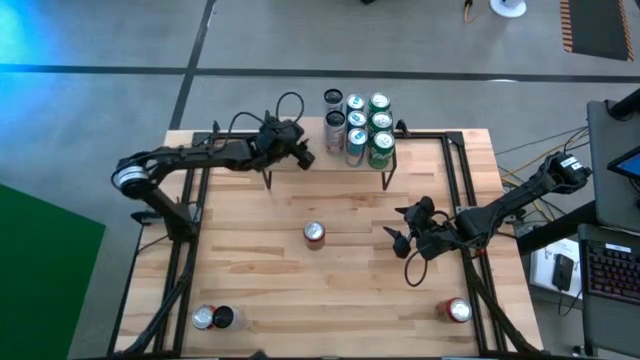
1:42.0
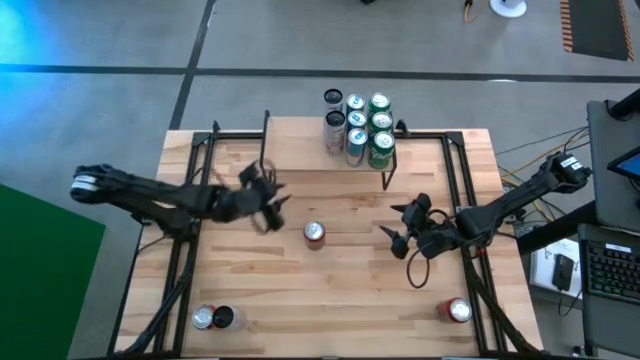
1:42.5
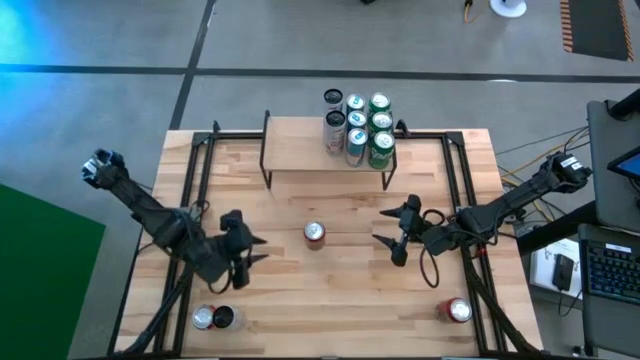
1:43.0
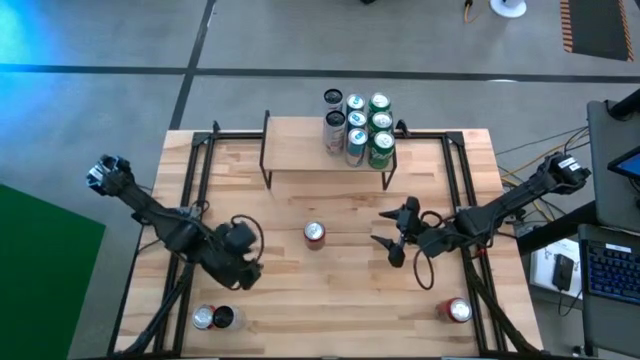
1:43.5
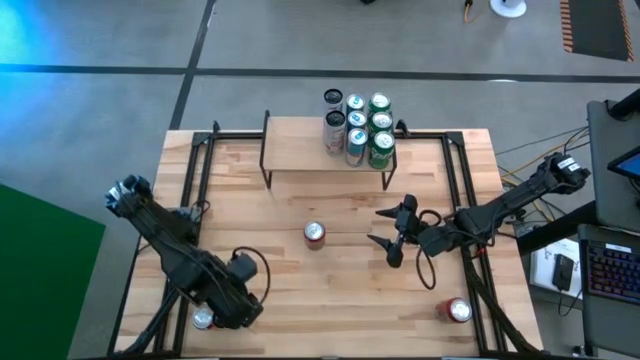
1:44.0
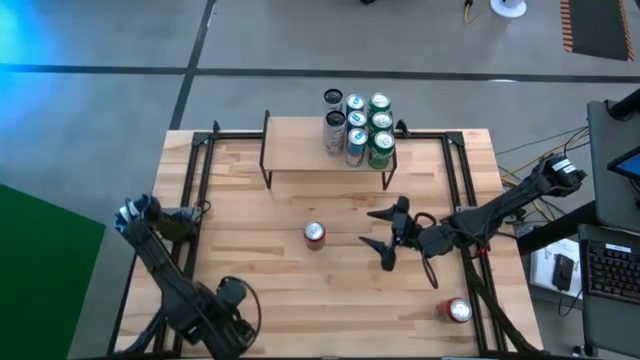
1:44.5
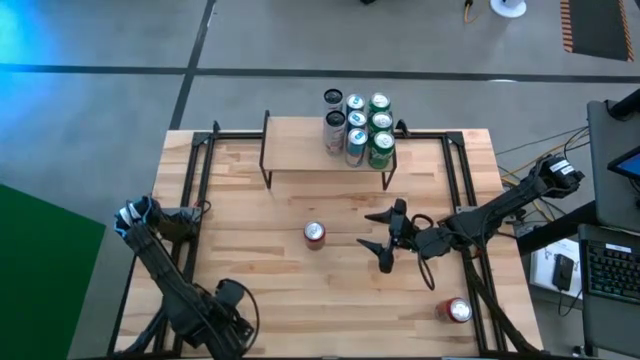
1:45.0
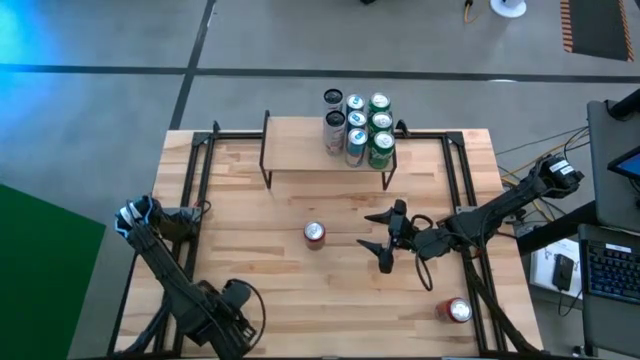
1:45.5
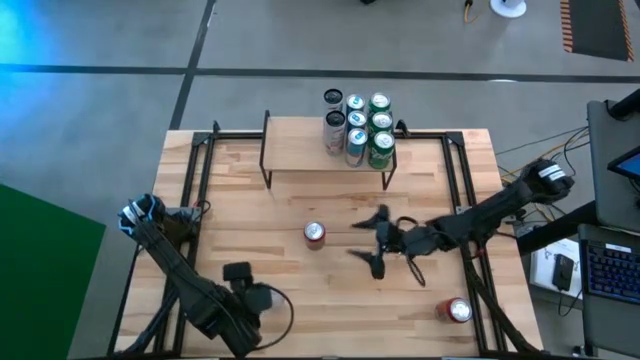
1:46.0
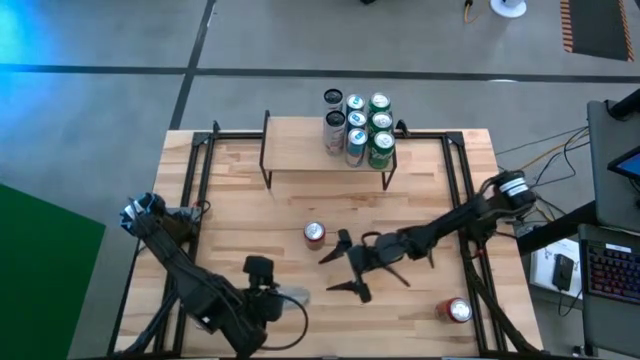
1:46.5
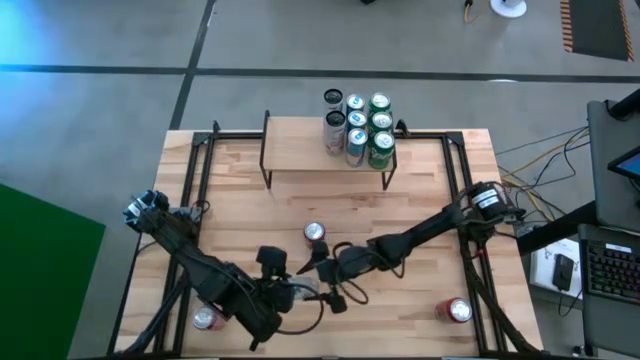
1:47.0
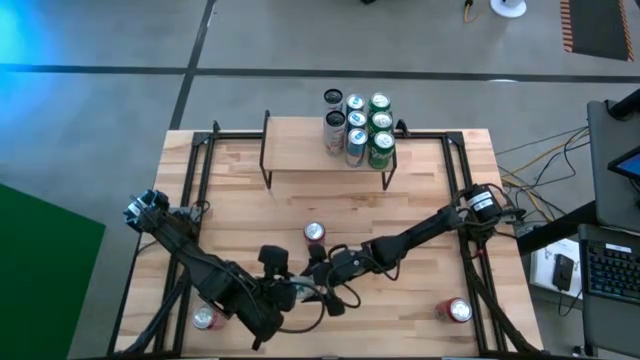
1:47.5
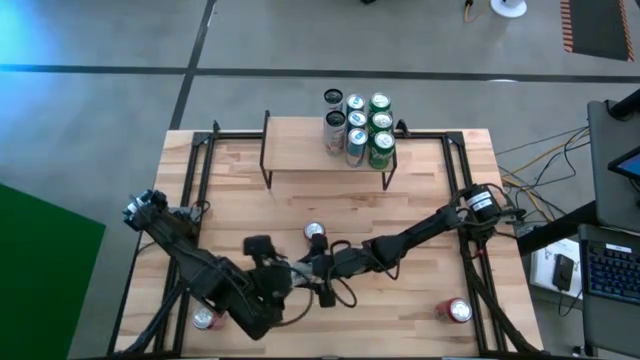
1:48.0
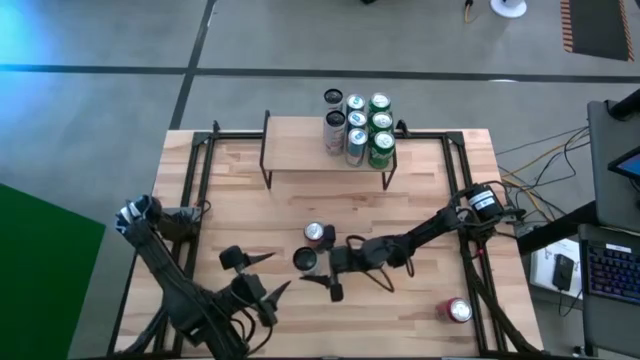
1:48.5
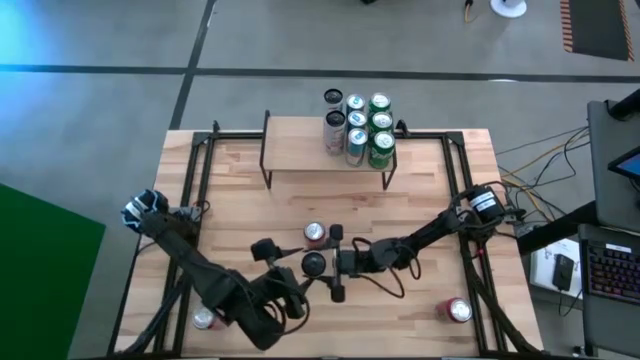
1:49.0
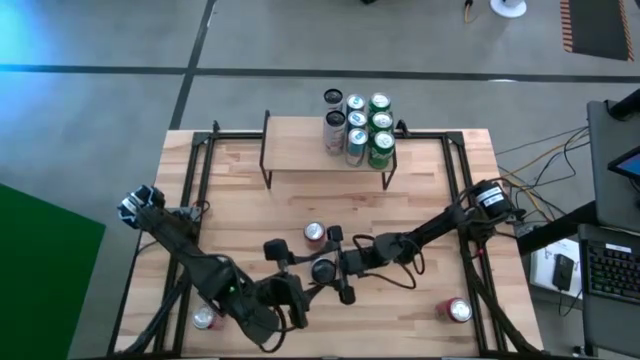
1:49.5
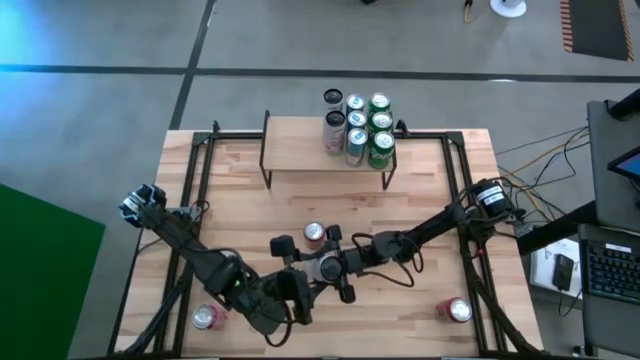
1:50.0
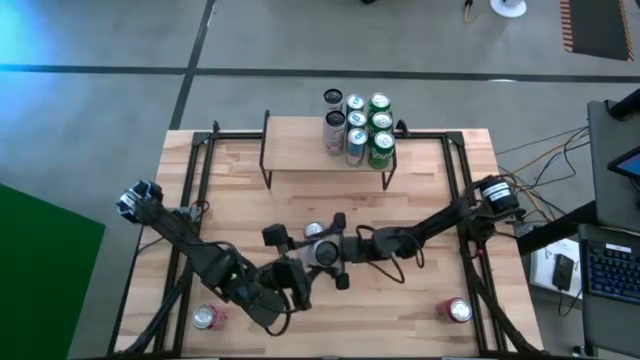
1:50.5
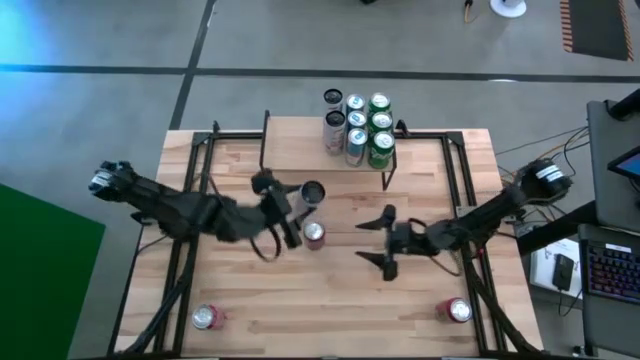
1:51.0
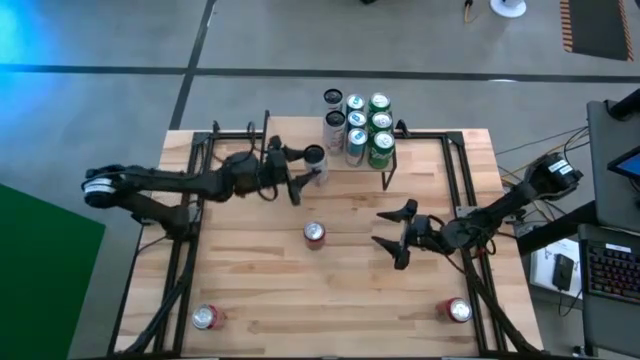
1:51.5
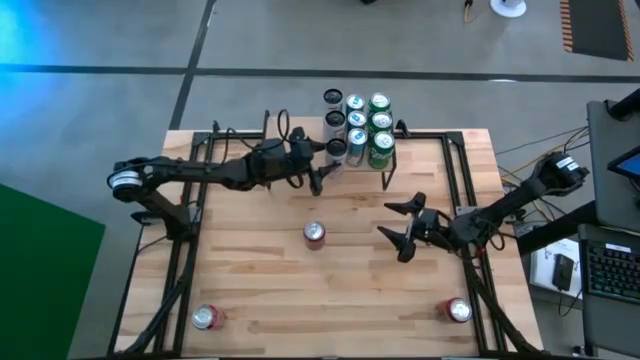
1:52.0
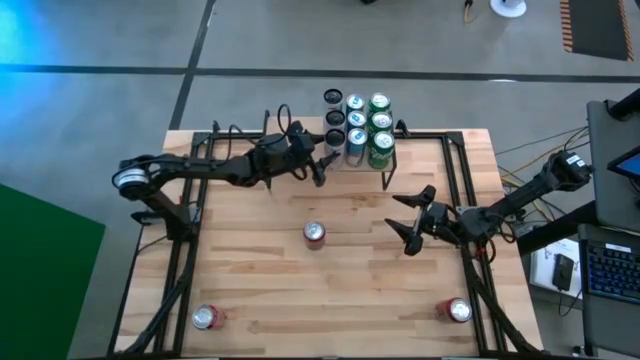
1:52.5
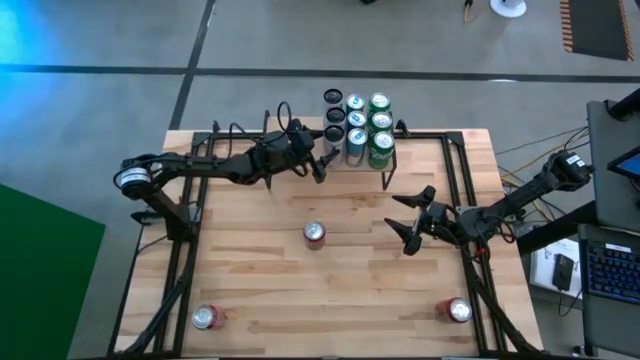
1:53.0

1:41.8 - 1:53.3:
Task: Place canned beverage on shelf
Put the white pink soda can on the shelf aligned with the other white pink soda cans

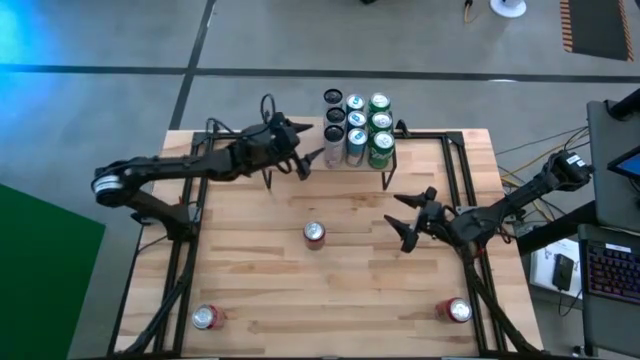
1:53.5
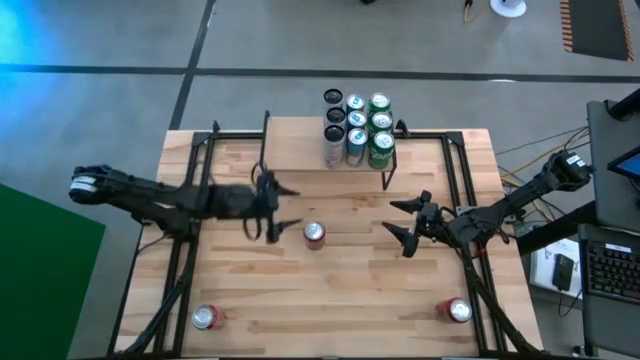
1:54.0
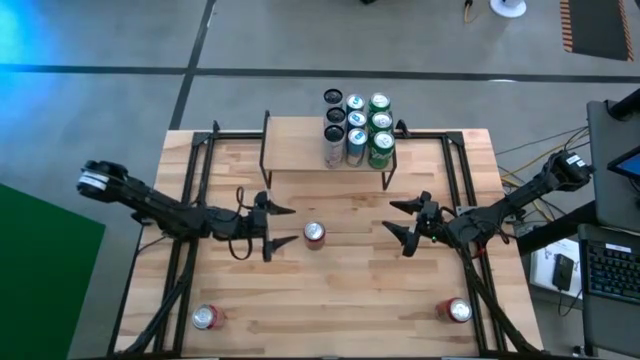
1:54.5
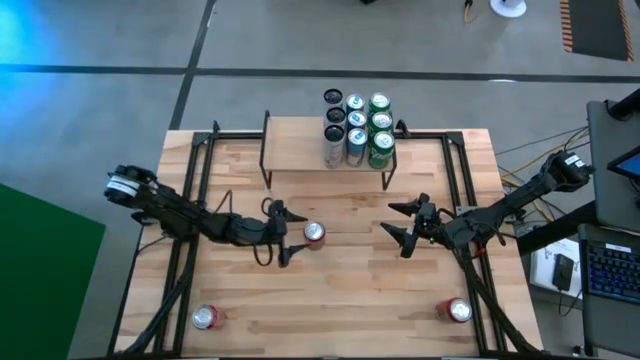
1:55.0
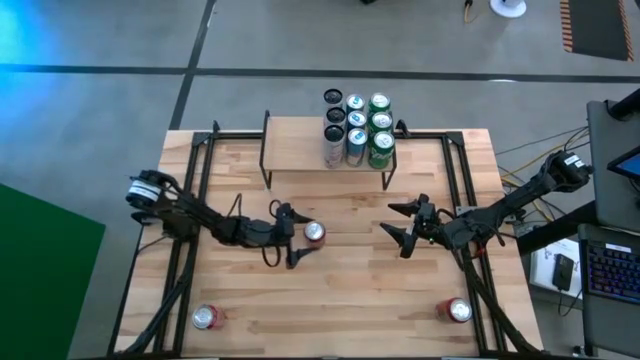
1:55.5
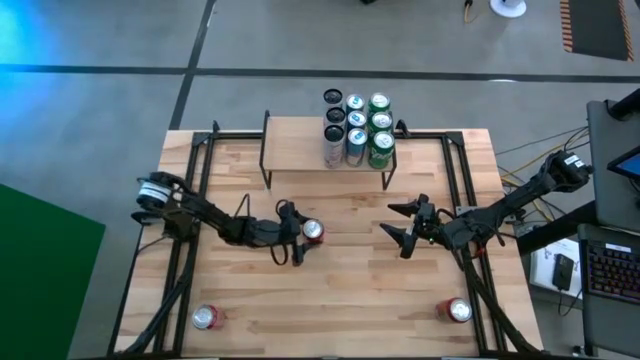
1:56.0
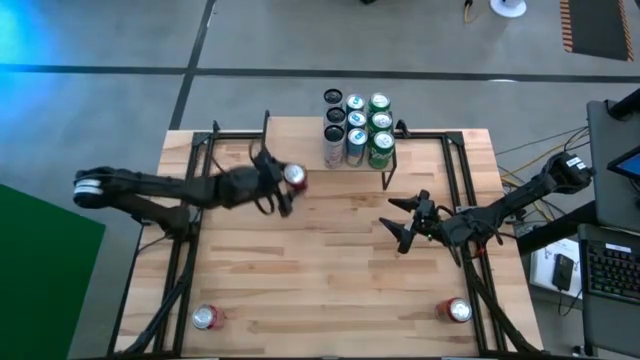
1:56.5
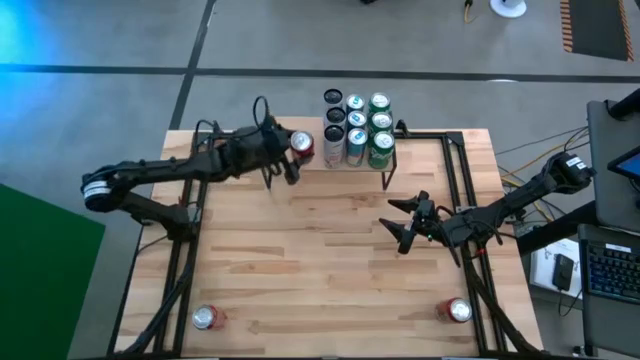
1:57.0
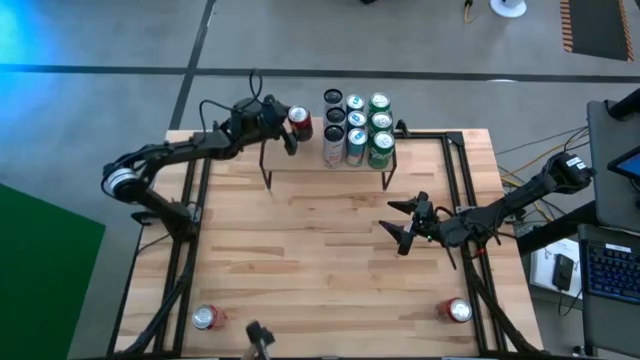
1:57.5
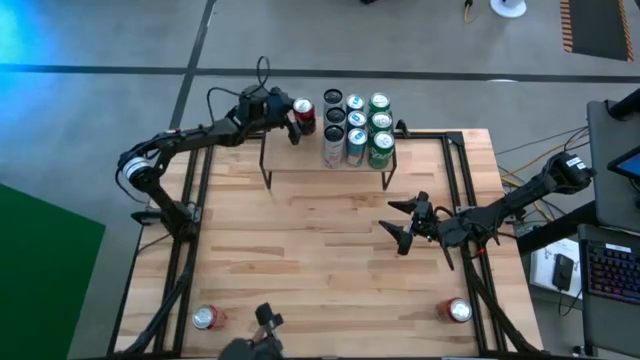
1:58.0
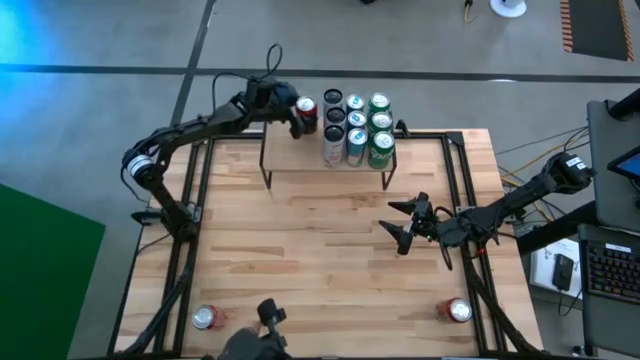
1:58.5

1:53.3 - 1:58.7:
Put the top red soda can on the shelf

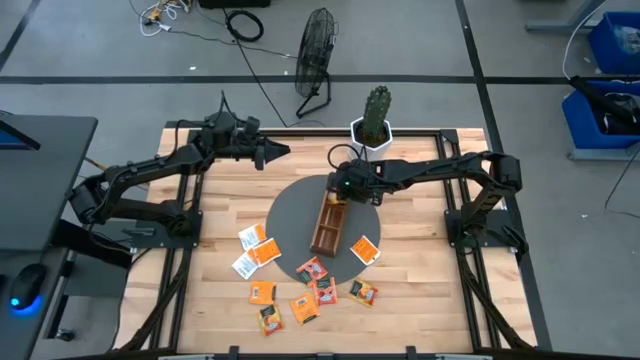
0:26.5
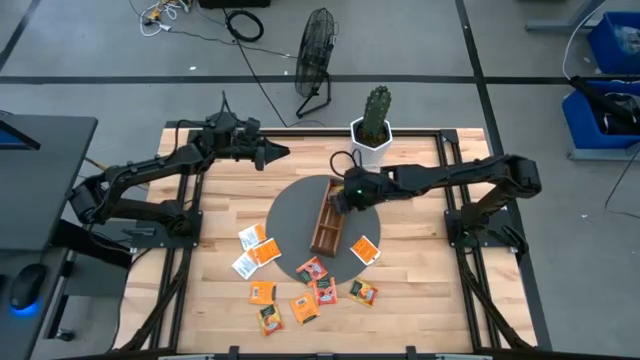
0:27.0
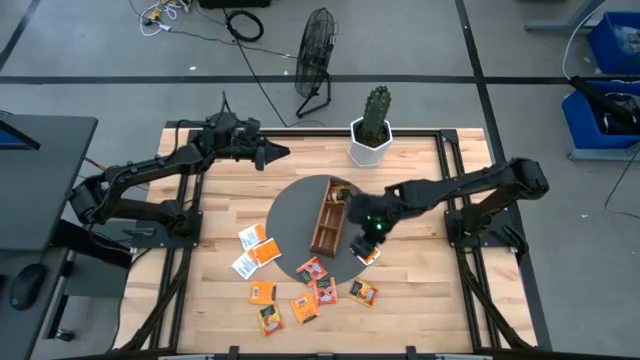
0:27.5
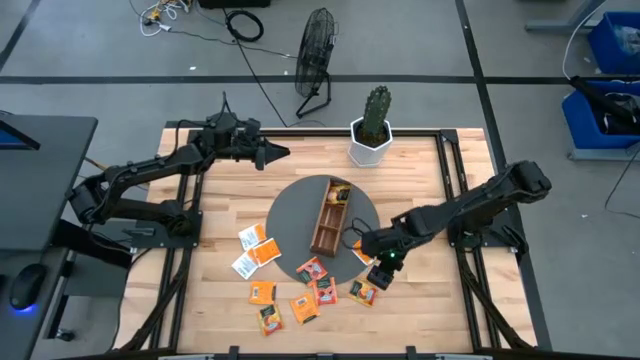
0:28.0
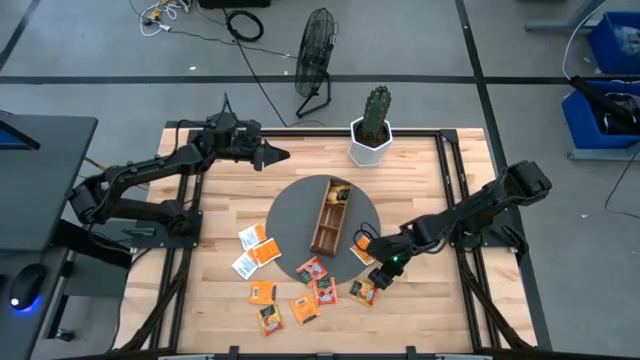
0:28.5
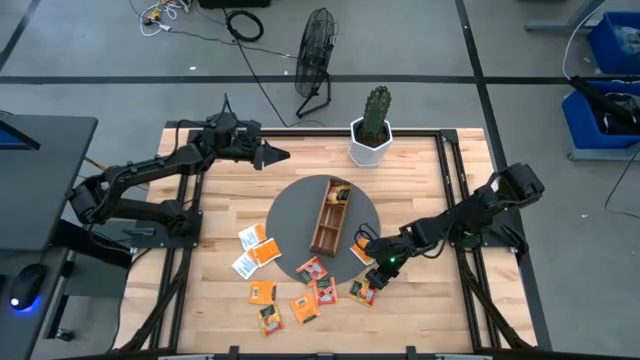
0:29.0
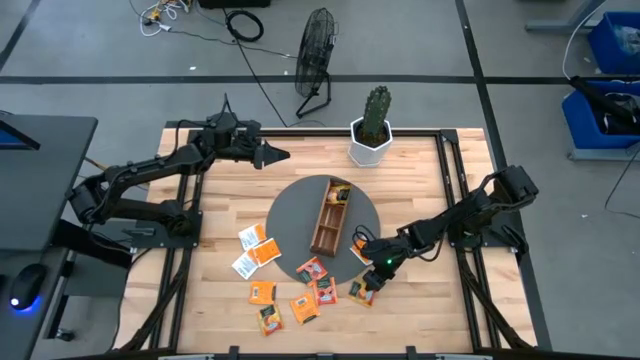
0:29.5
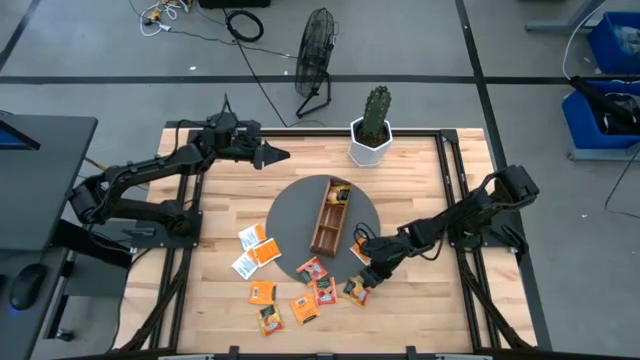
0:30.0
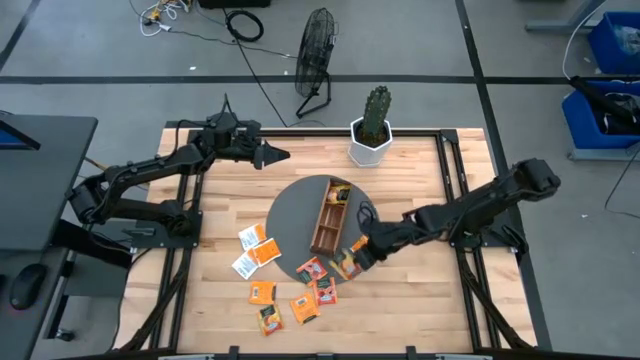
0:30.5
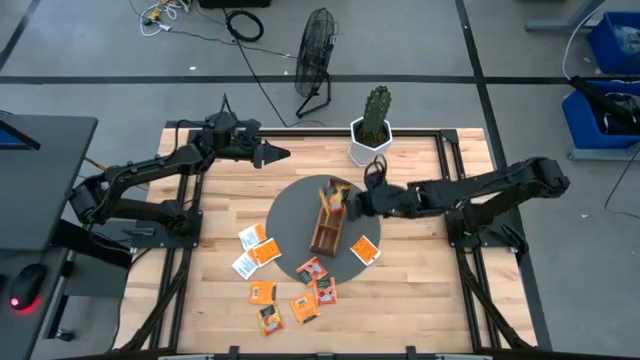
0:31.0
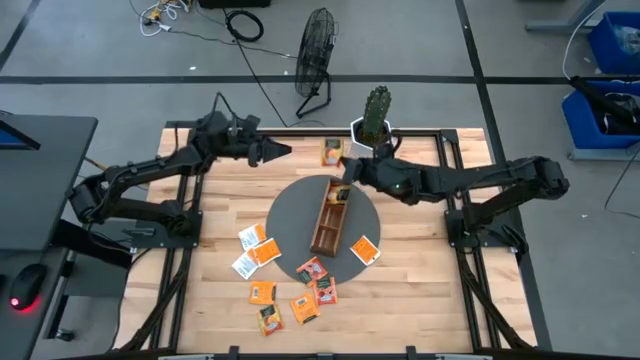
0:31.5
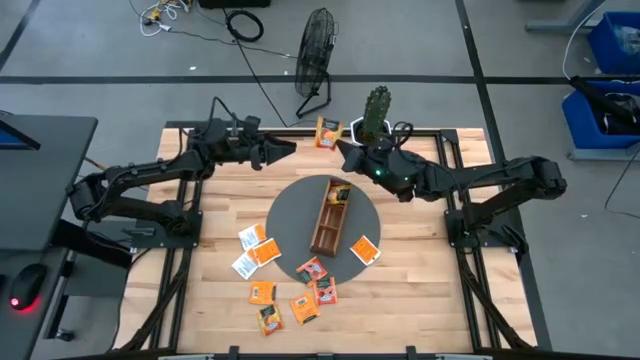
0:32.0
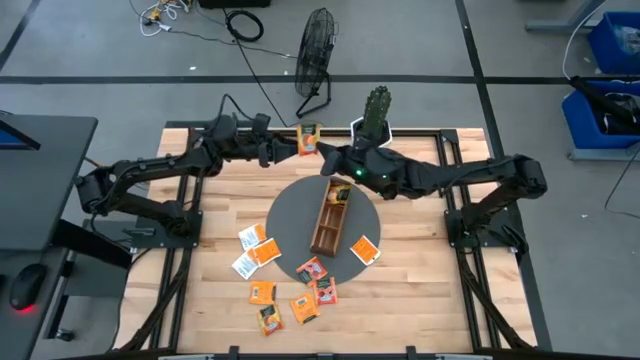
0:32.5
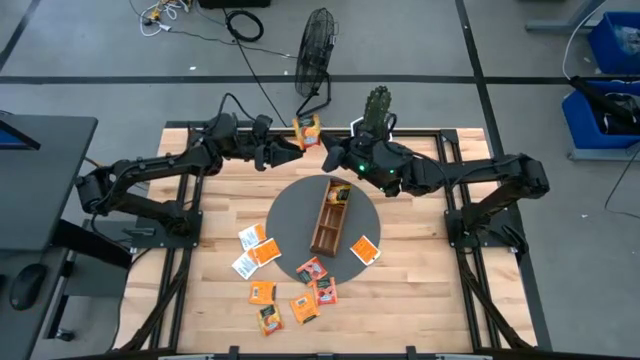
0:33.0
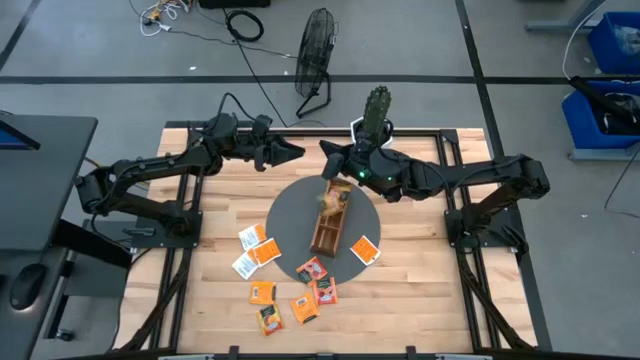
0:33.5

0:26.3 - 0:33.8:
Task: Pick & Place Tea
Put the orange tea bag into the top section of the wooden organizer
